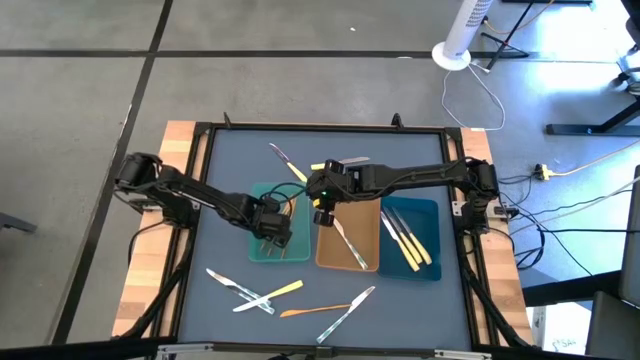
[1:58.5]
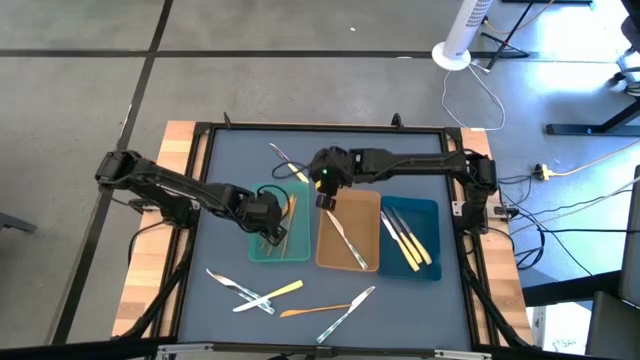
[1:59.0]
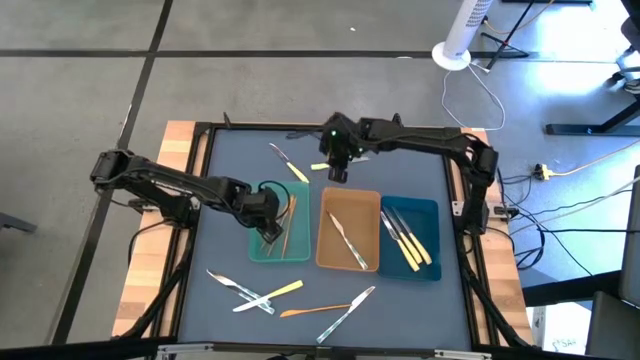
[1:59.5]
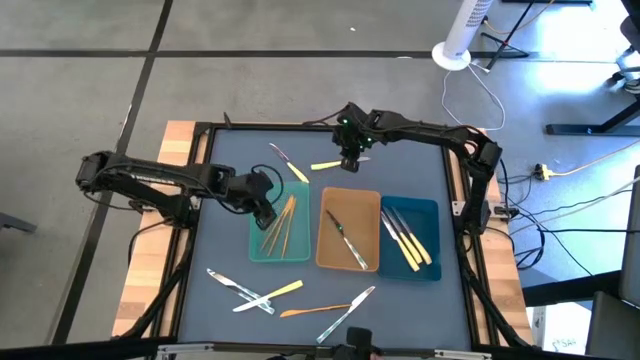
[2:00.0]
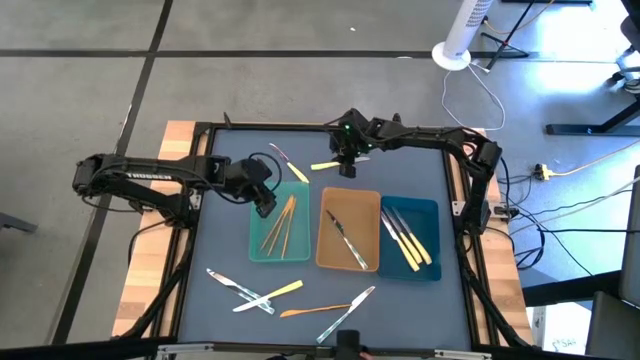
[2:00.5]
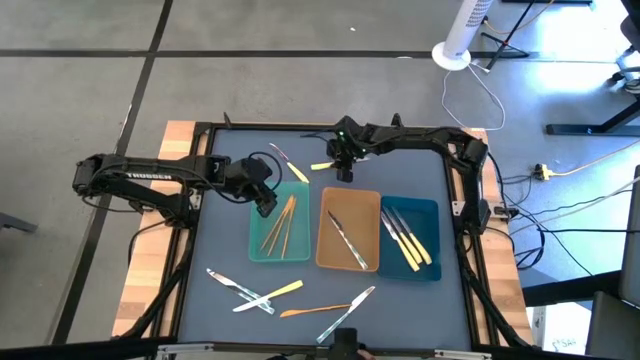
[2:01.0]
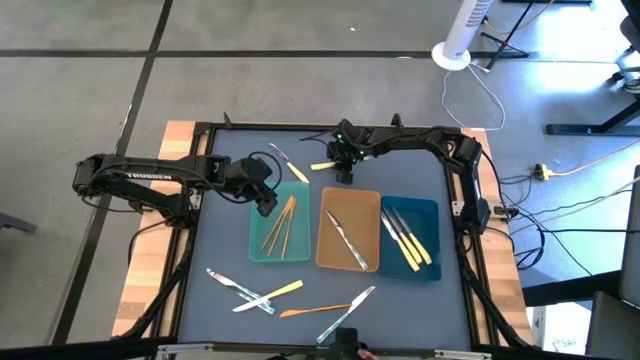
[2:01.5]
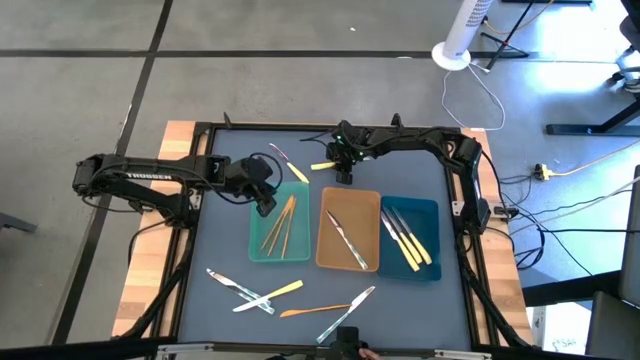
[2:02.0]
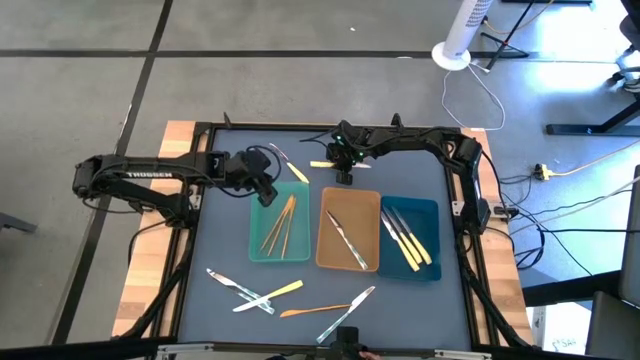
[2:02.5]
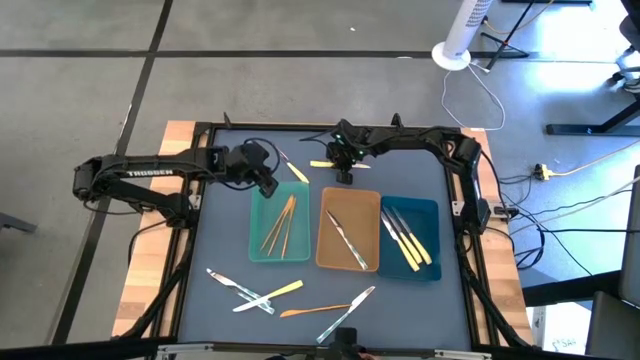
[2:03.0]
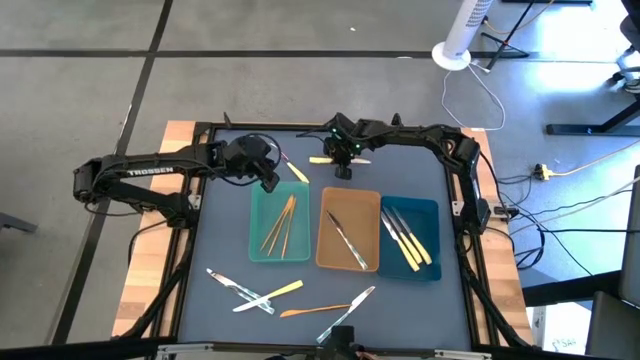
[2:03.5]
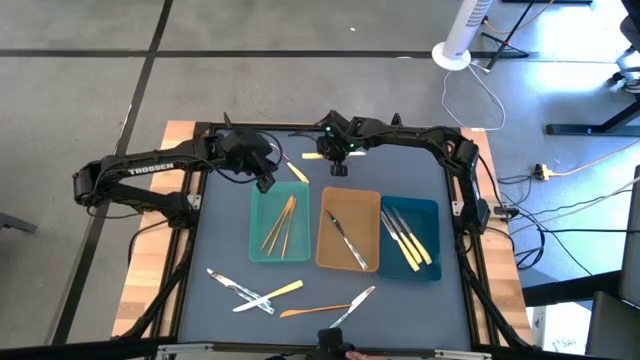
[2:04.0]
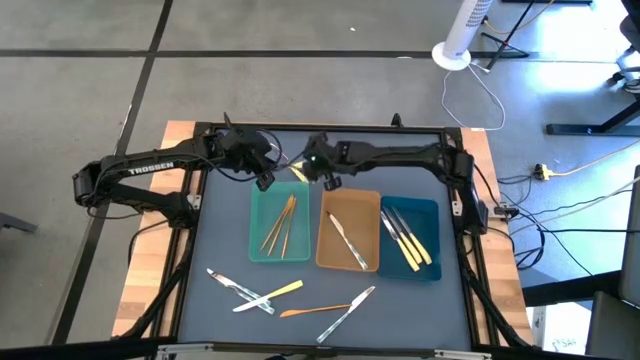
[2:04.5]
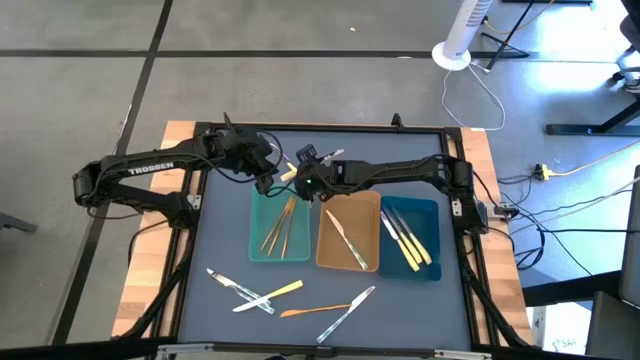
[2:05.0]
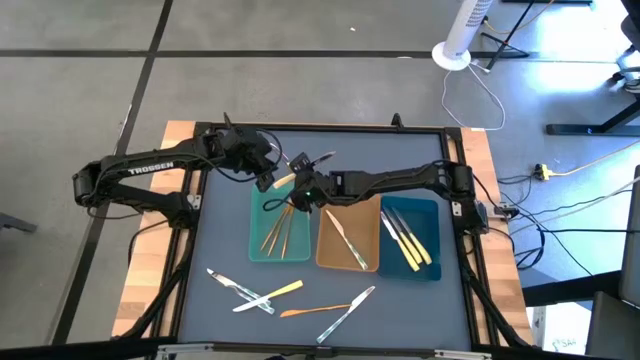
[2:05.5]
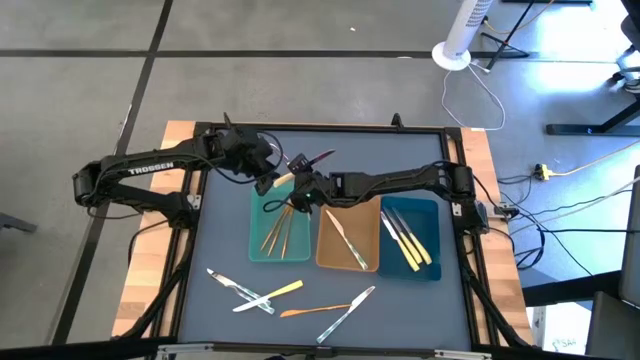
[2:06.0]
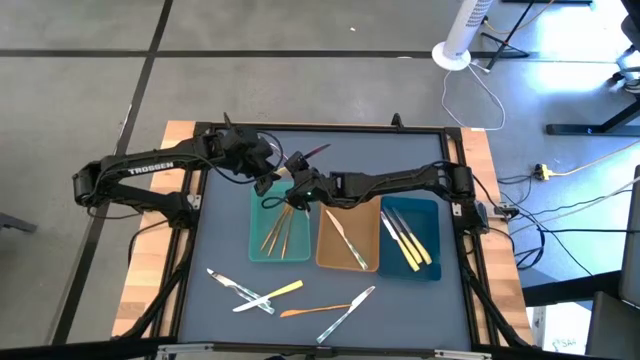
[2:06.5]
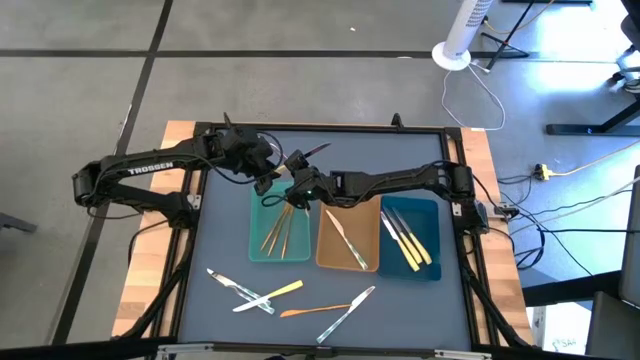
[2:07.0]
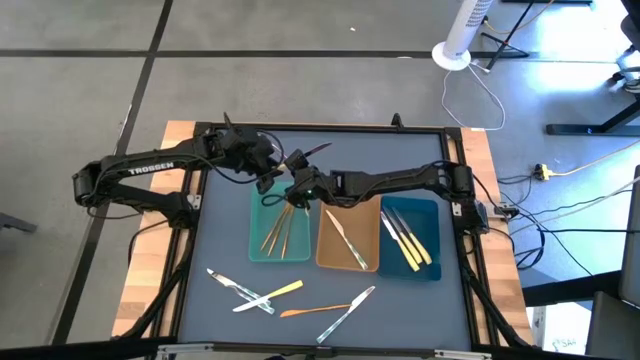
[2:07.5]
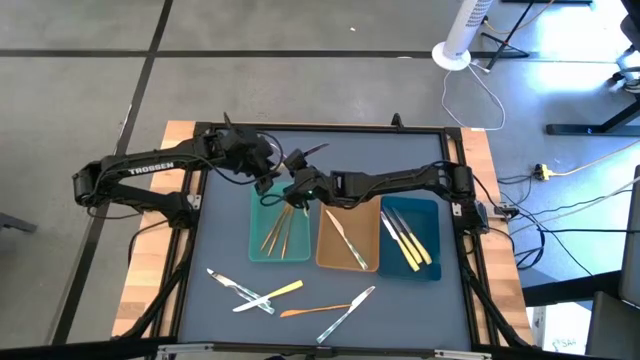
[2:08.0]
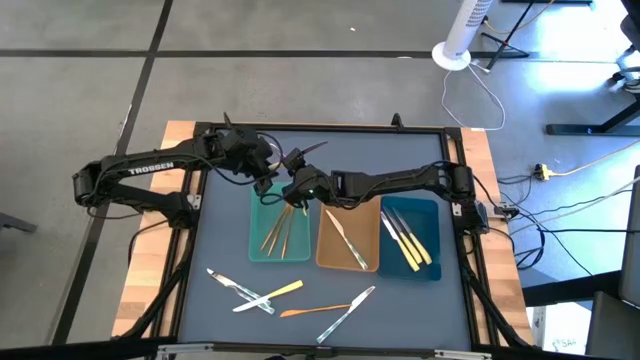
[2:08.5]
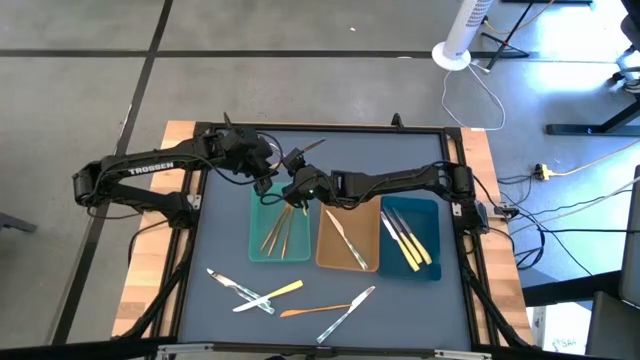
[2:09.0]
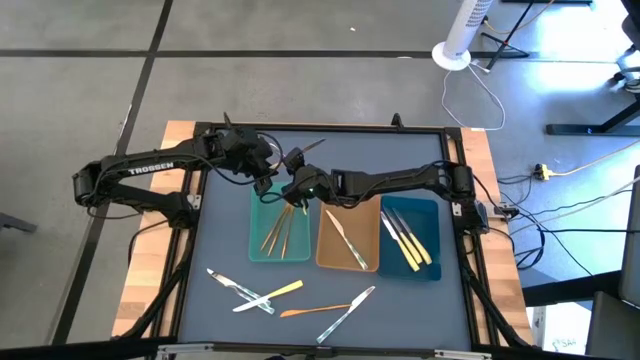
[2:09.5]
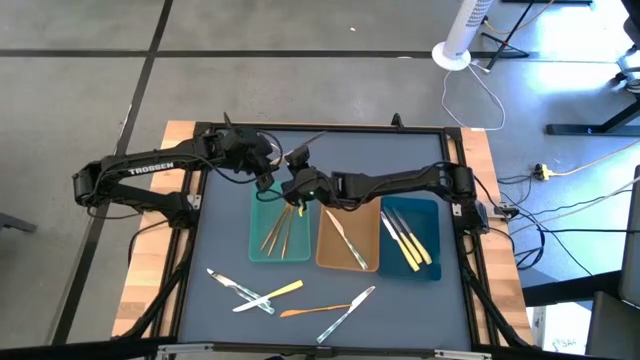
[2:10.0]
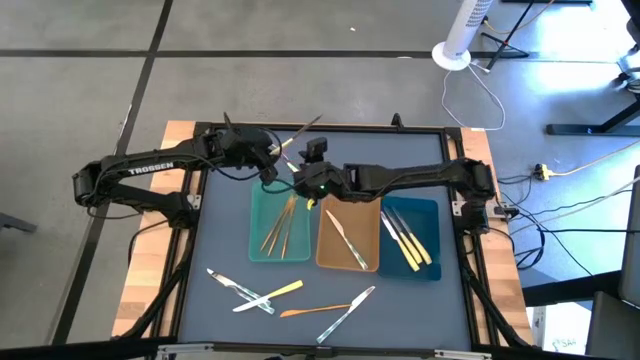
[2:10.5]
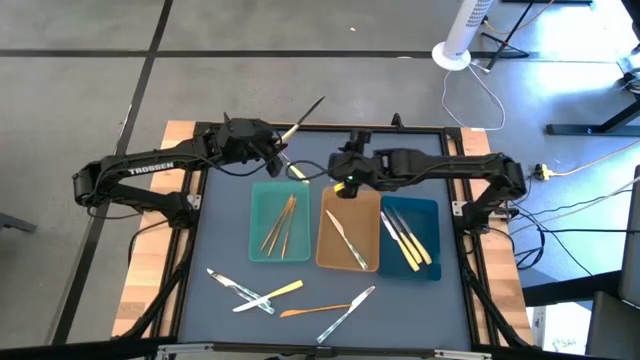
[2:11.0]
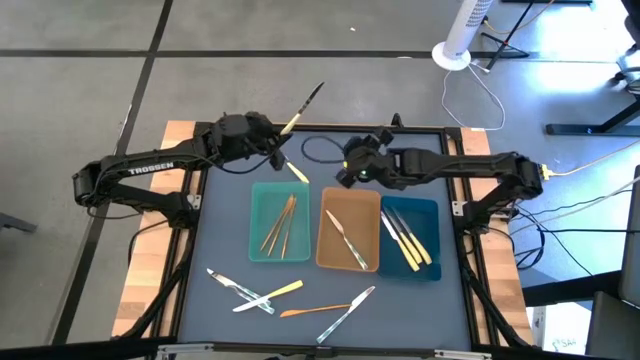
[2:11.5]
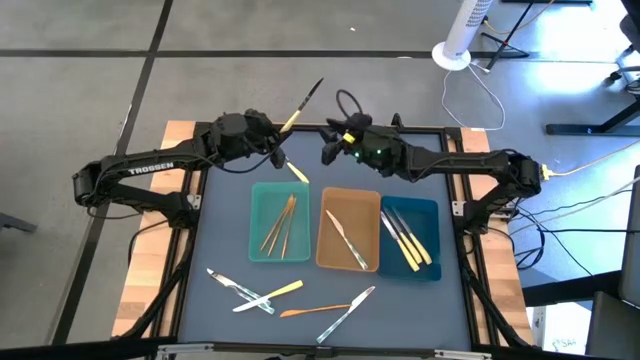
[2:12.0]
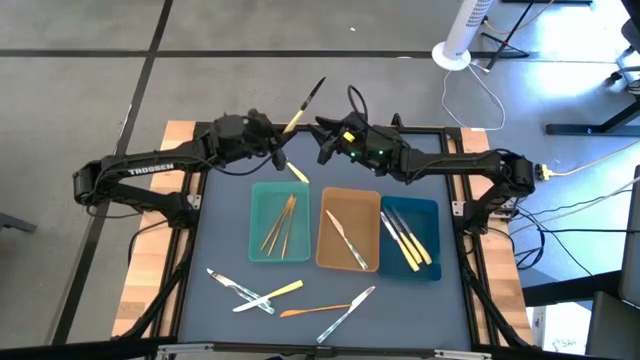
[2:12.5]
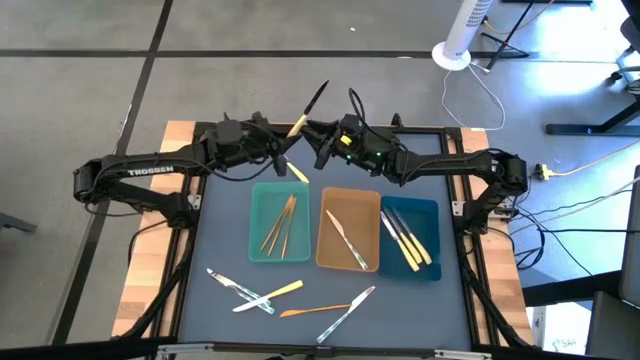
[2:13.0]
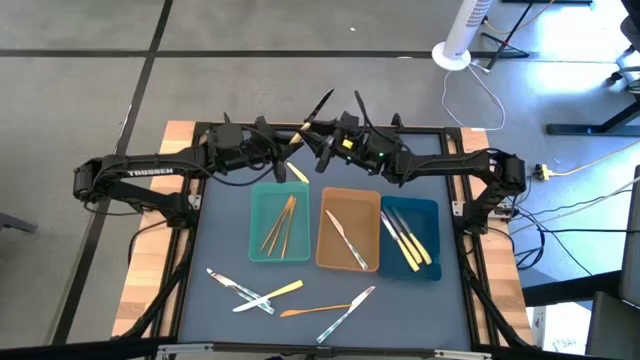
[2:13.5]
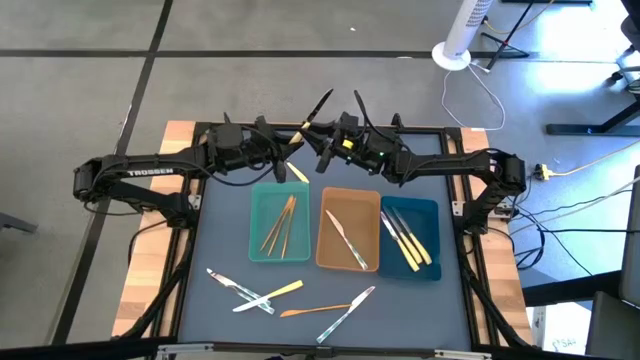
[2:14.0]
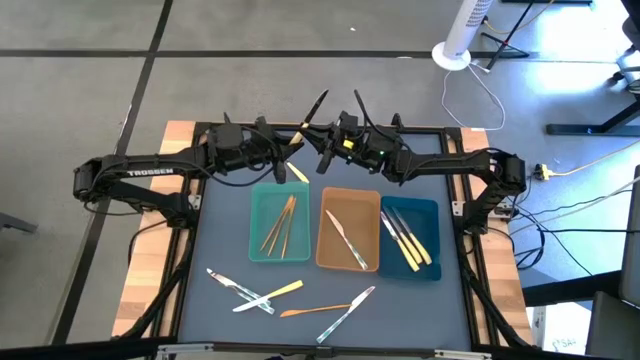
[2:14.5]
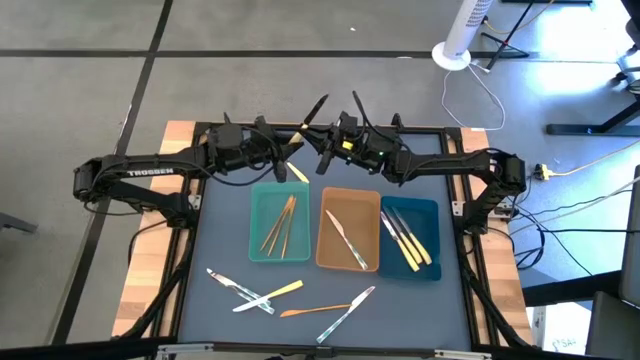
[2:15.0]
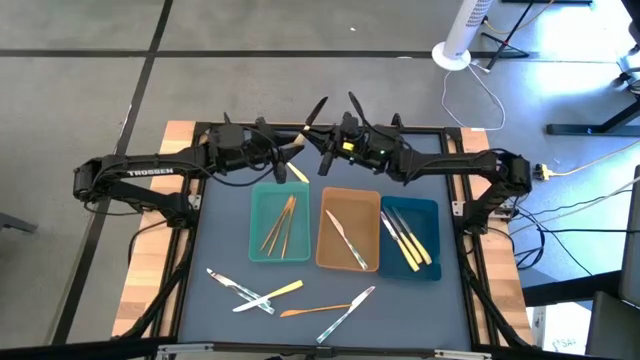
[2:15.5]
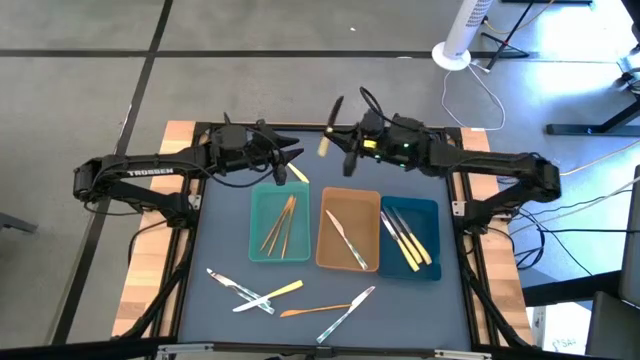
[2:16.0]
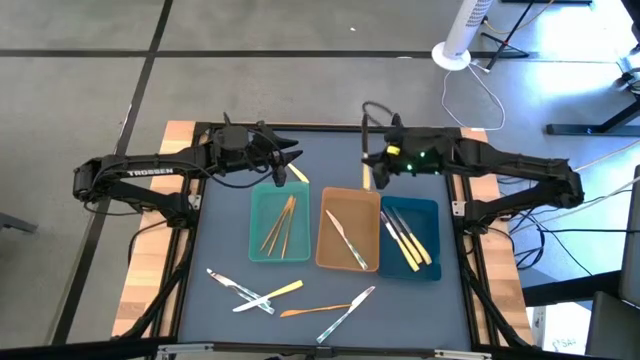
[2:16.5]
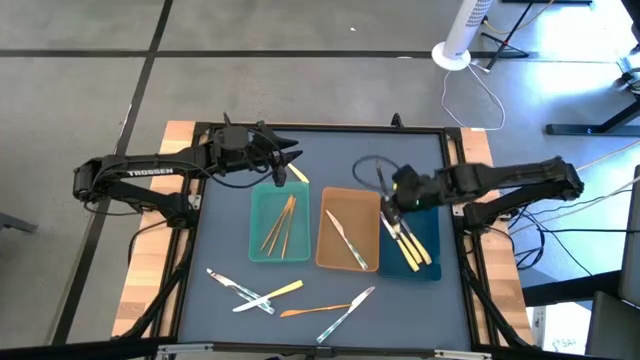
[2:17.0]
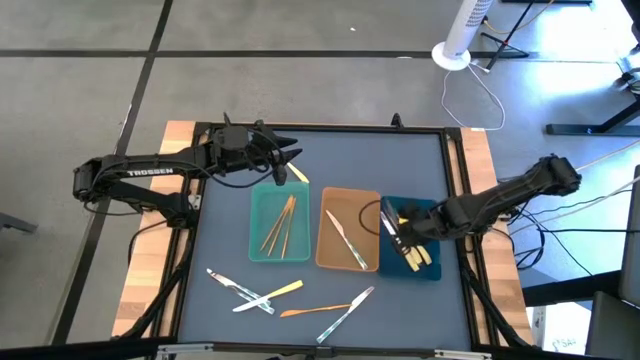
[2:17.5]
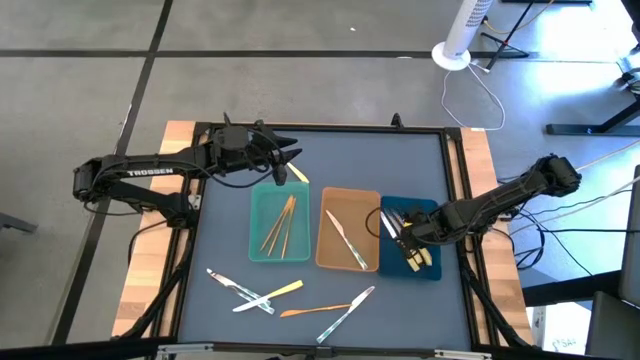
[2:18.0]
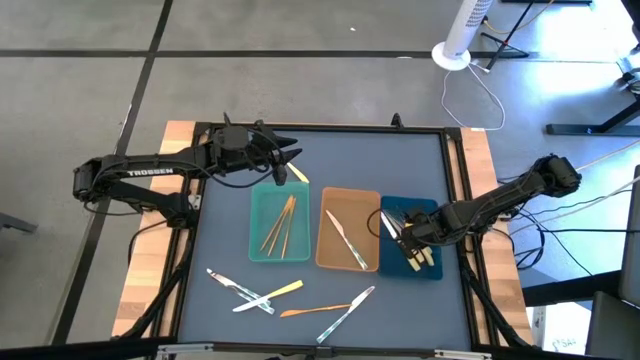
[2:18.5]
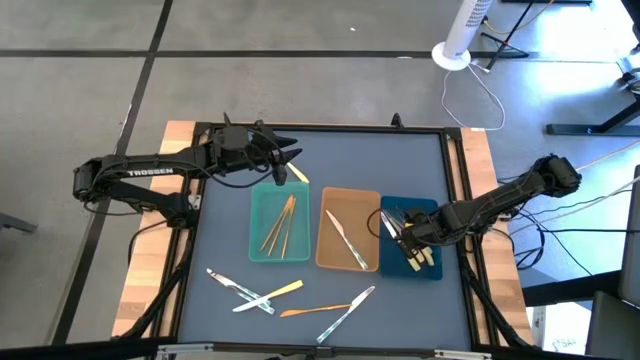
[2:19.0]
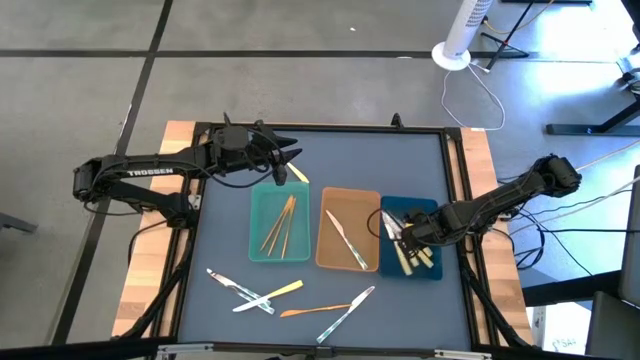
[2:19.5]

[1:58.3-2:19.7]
Task: Sort silverware by color (type)
Put the yellow knife into the blue bin
